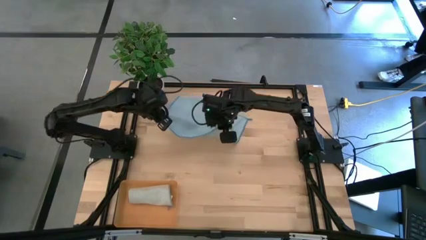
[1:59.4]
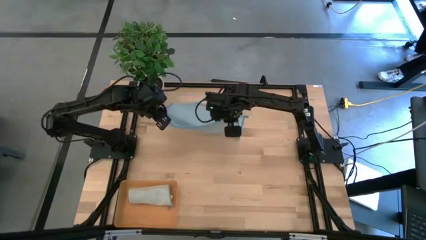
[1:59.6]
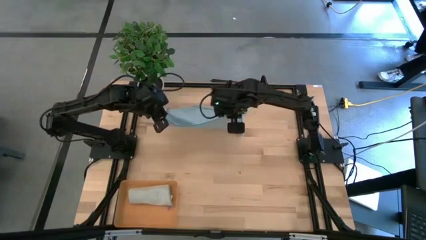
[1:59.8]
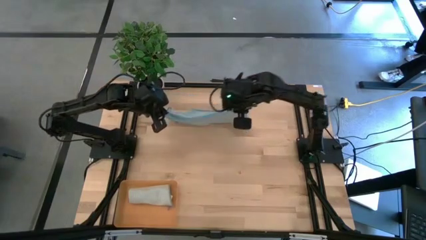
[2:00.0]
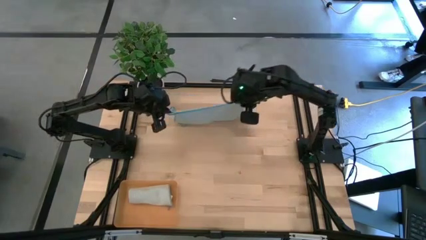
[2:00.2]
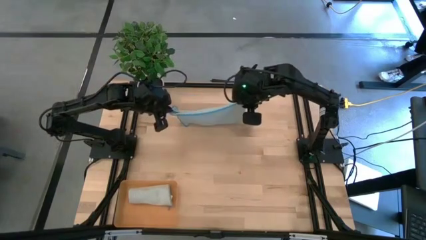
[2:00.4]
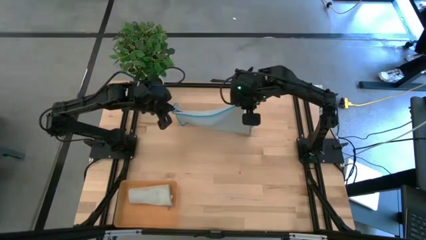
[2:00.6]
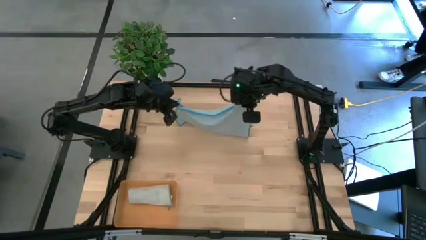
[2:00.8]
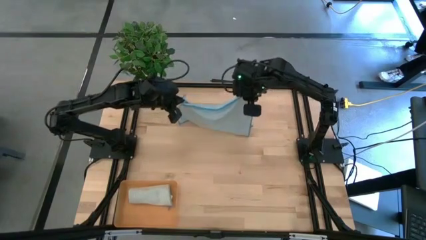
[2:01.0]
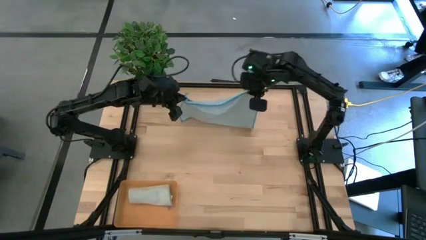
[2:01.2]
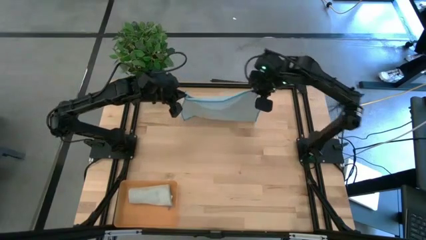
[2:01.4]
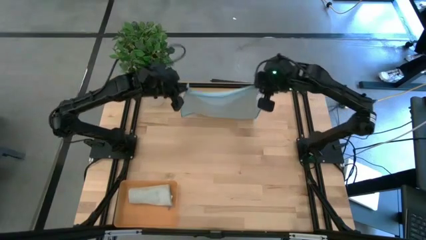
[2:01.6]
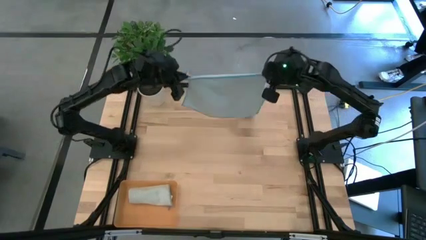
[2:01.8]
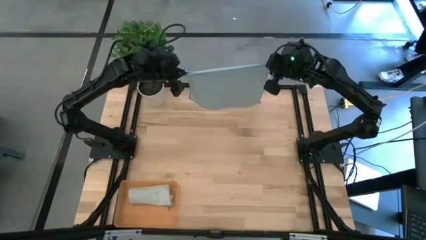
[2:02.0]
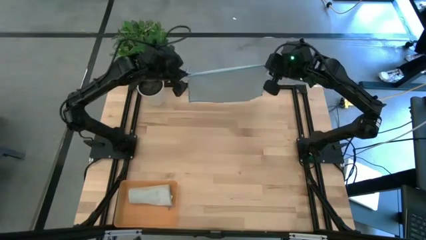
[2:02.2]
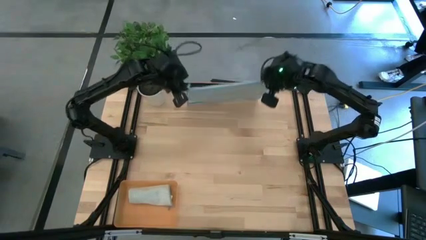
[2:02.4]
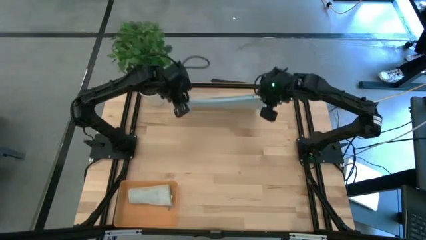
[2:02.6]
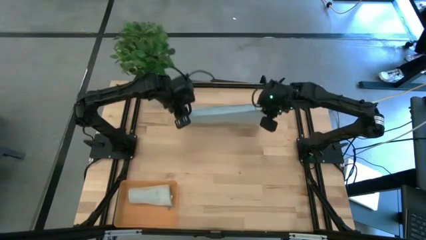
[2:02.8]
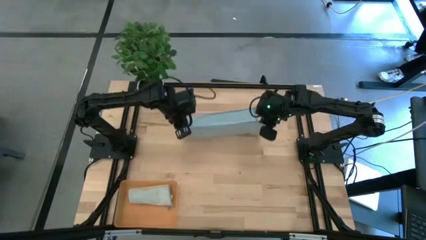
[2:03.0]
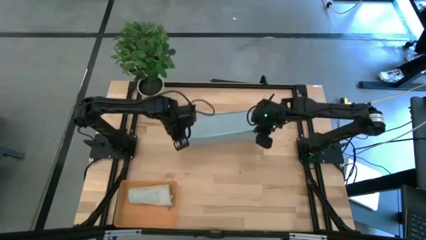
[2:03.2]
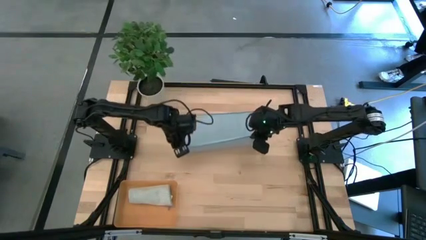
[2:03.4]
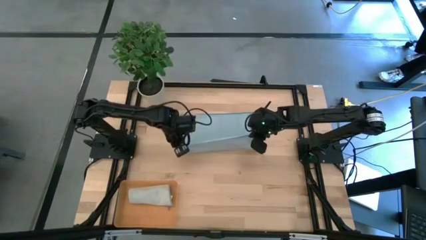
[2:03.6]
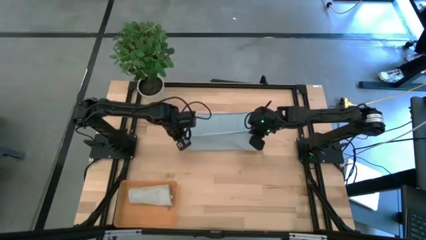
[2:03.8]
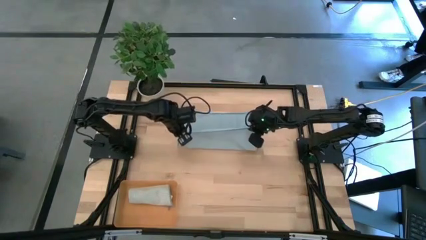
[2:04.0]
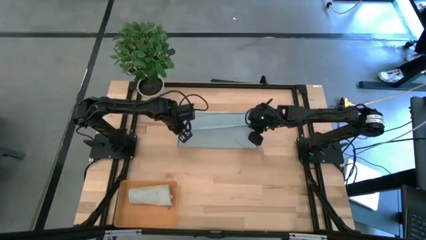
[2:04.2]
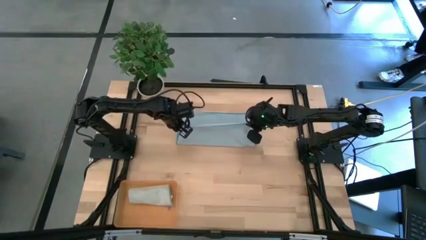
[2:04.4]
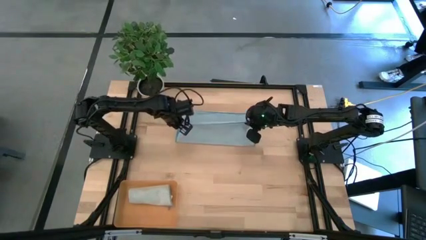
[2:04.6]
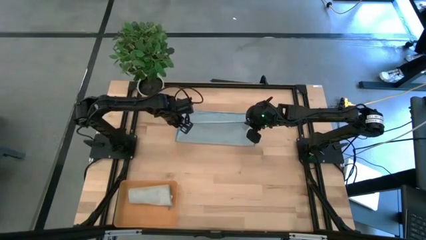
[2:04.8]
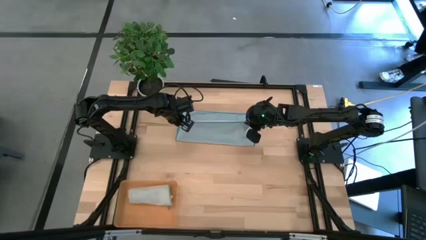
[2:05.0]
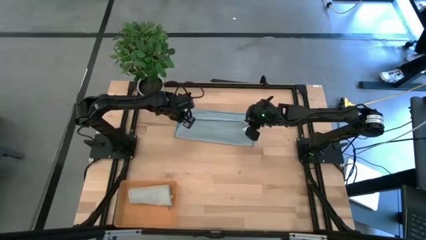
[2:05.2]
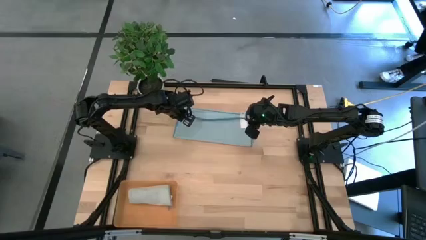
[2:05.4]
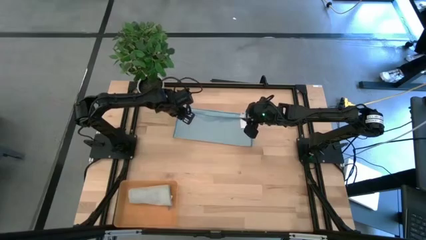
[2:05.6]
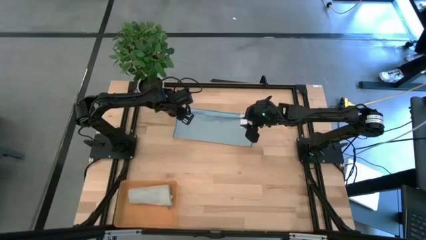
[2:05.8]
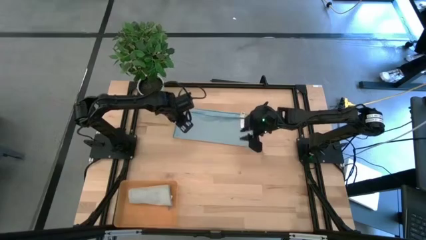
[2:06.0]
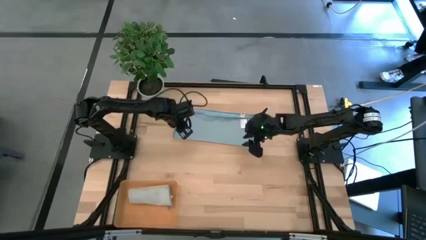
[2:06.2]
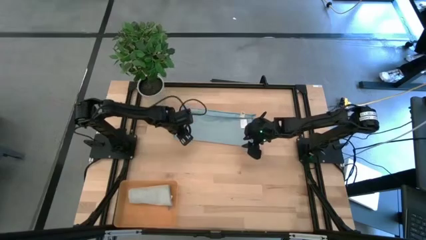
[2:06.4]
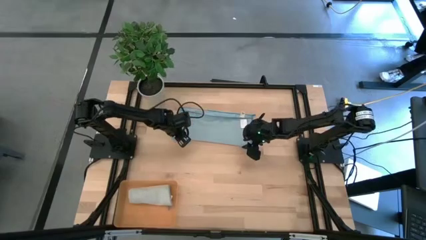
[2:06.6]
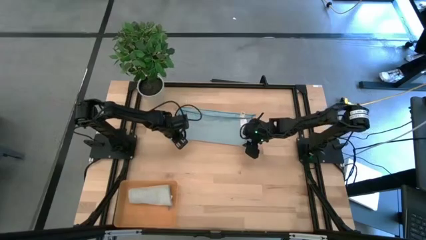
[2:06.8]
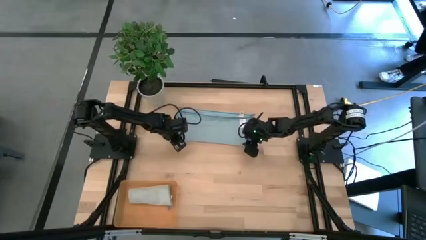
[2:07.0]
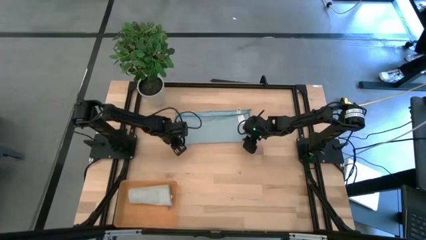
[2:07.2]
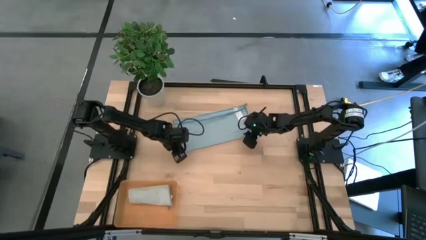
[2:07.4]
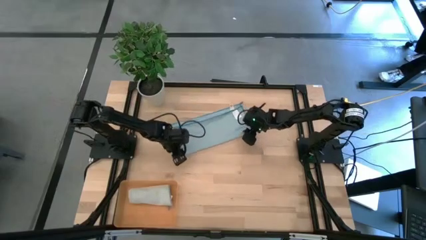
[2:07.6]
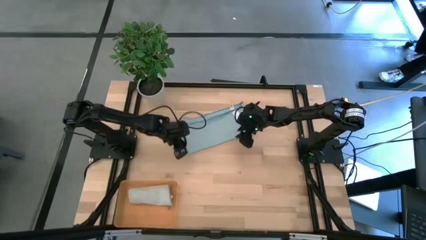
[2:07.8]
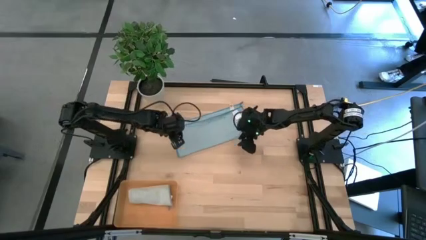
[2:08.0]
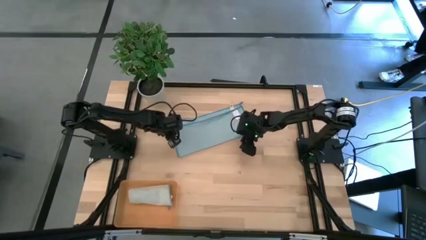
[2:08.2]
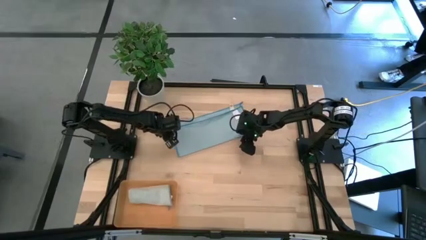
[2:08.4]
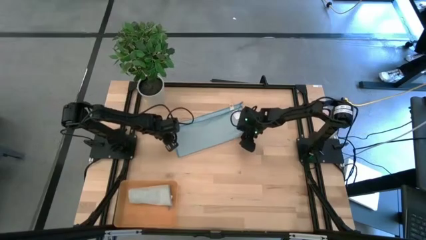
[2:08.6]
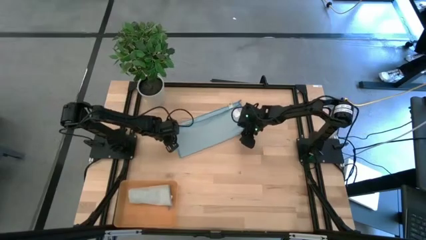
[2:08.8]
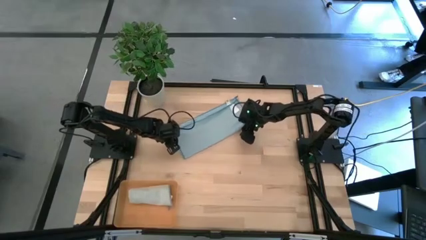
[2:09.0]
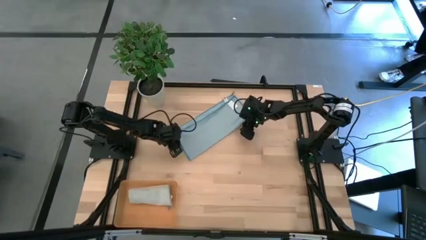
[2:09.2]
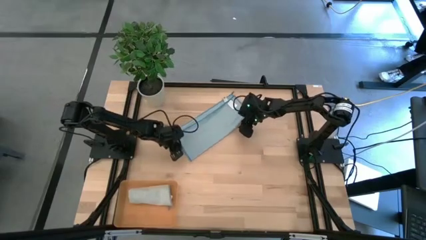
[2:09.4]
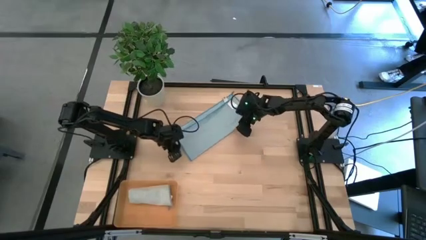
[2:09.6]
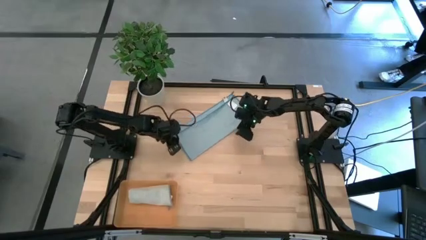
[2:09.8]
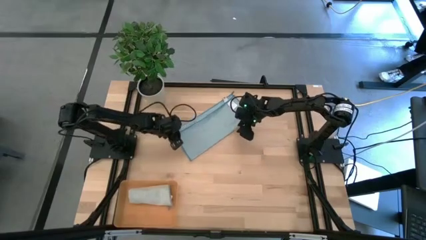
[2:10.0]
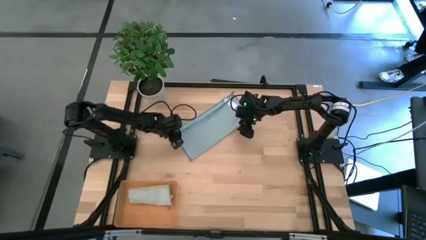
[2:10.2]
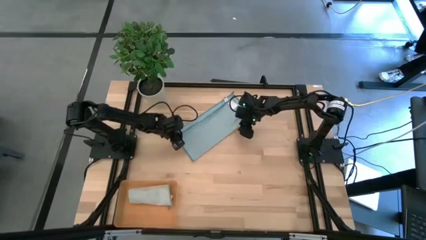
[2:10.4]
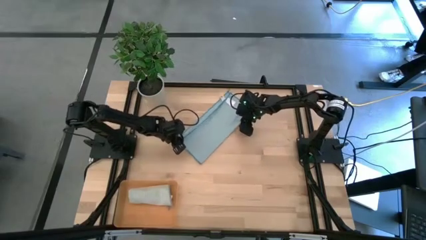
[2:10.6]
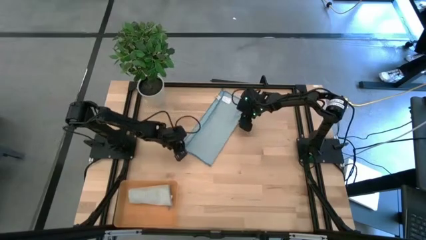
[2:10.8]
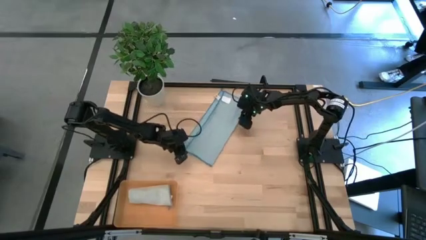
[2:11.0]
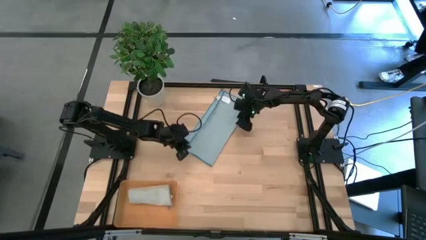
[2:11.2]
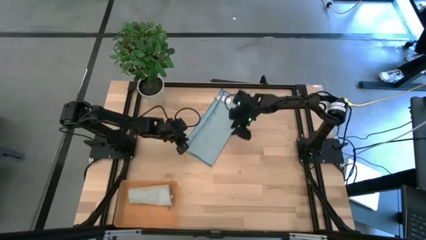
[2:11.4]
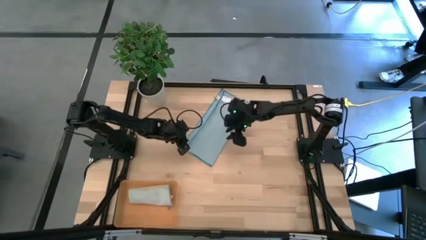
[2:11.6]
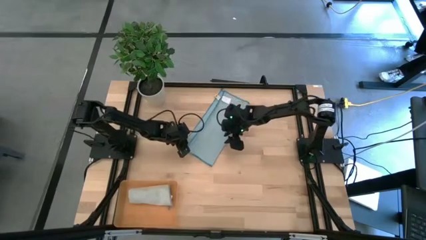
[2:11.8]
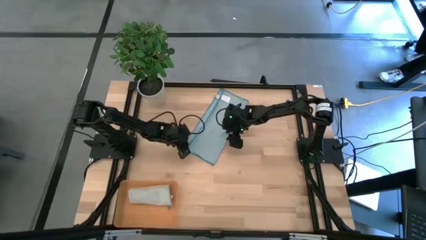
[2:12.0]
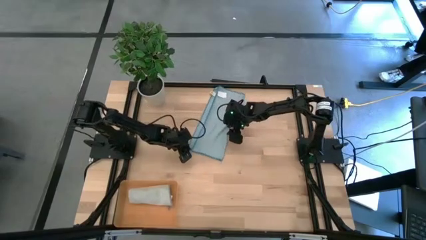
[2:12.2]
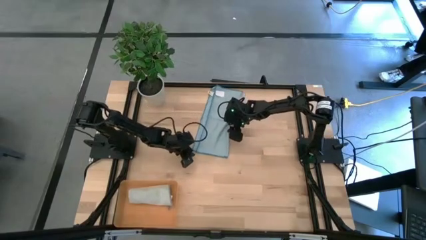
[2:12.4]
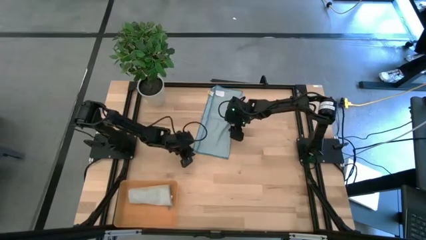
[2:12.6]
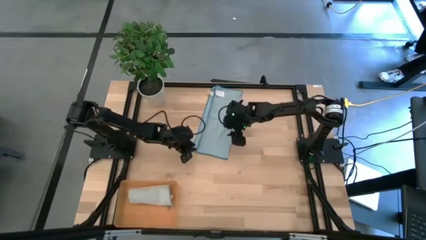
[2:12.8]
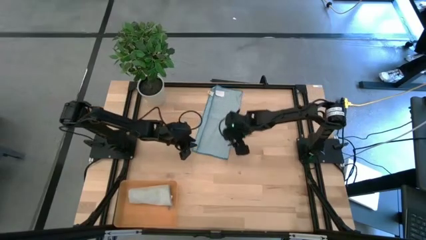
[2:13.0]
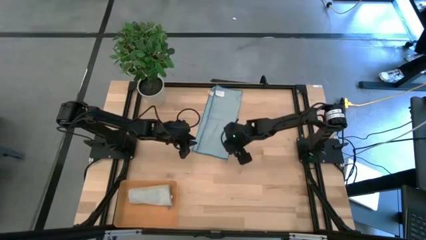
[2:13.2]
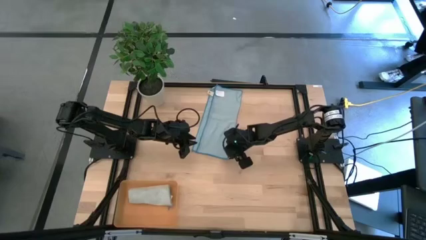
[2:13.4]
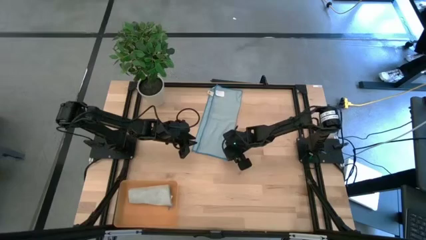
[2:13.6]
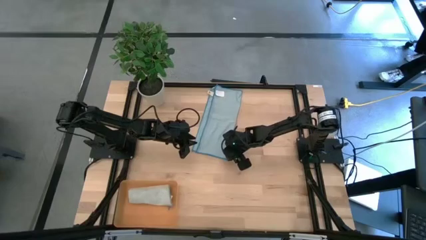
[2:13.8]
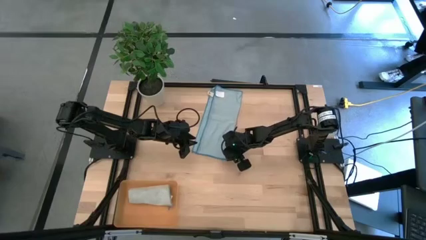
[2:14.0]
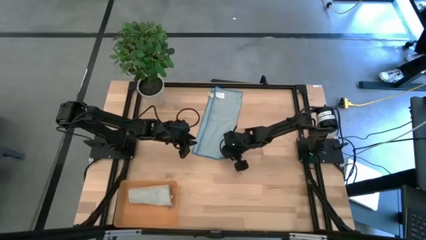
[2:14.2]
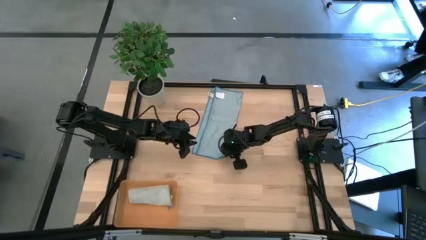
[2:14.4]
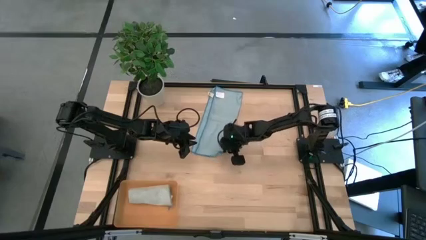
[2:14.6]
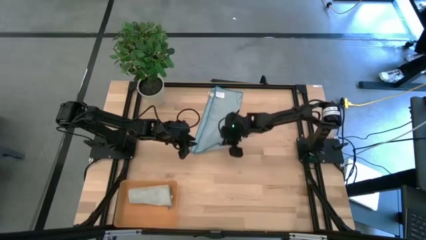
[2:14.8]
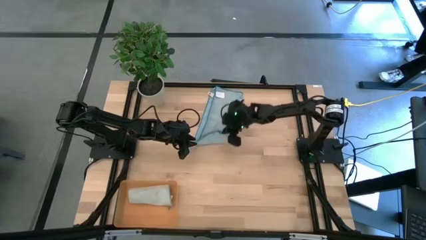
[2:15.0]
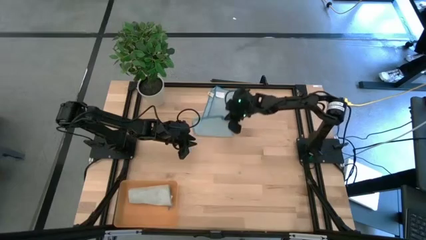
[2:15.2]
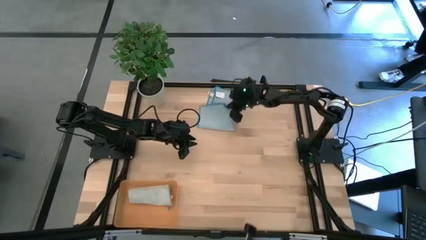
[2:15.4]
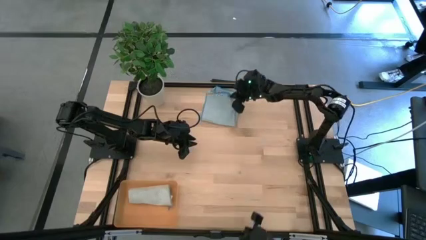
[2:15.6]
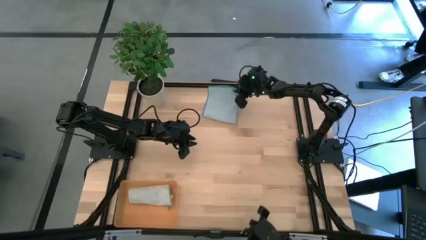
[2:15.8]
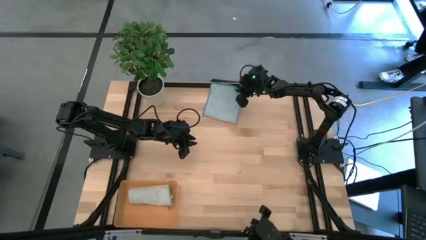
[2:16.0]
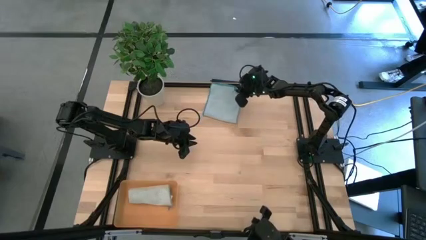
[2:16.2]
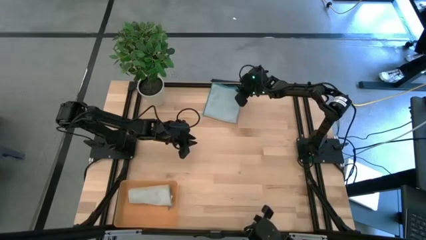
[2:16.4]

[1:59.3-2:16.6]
Task: Roll microfiber towels into tight, uniform cylinder then place into a basket
Fold the blue microfiber towel
